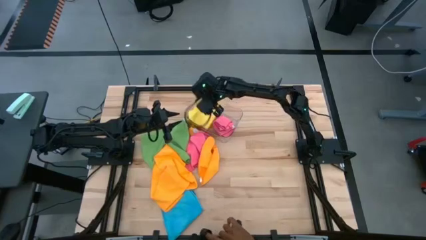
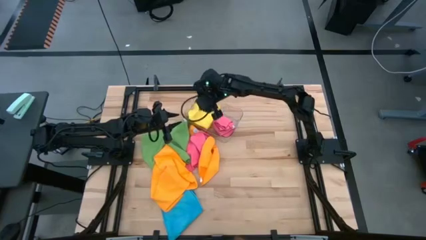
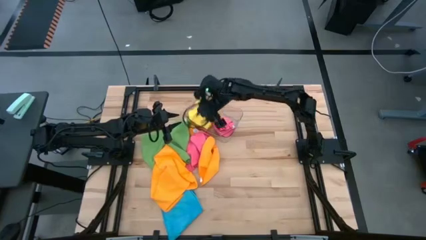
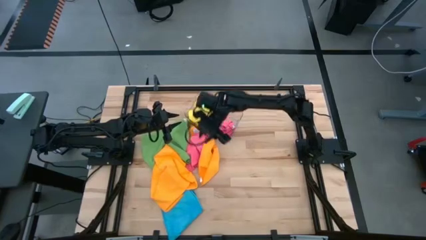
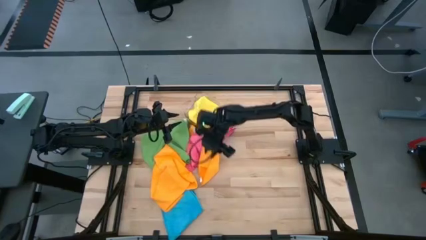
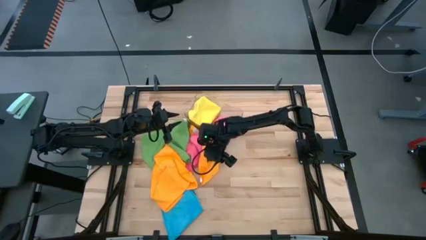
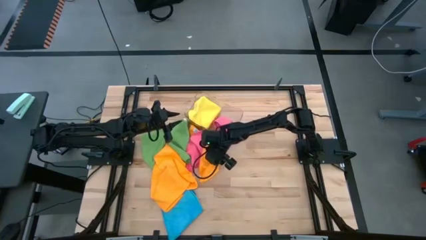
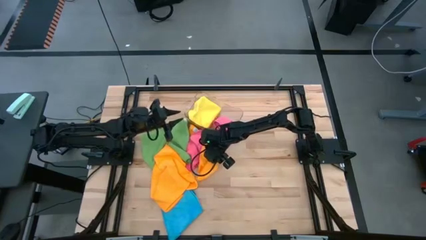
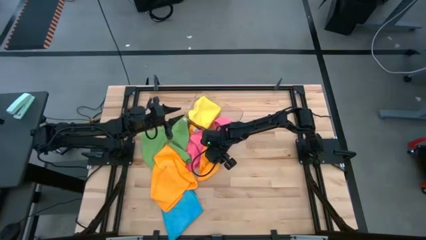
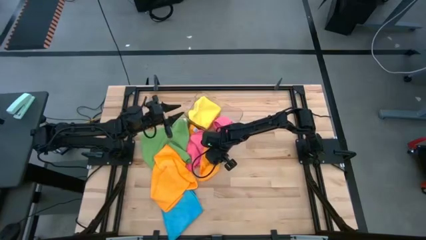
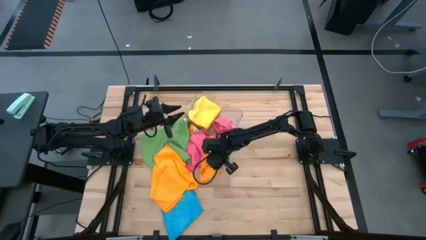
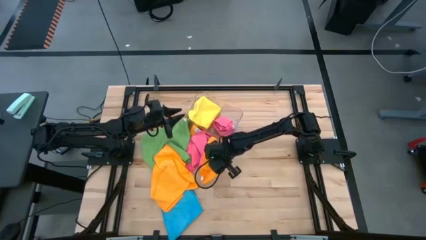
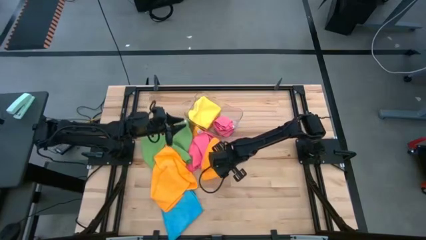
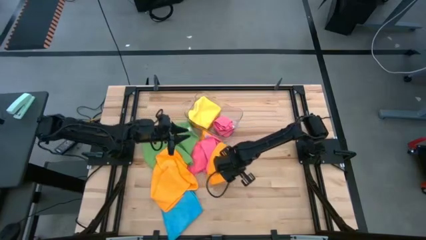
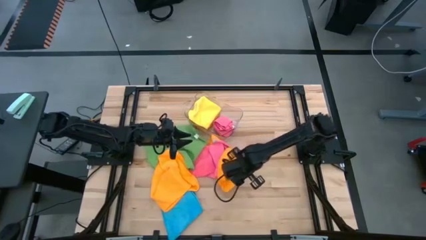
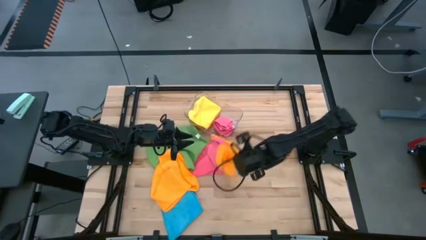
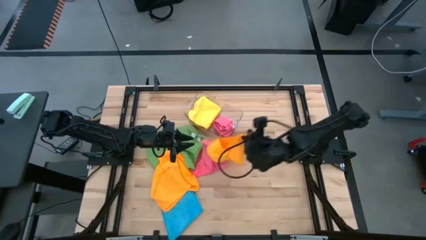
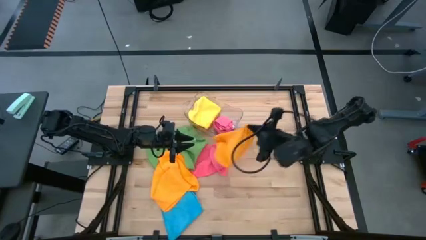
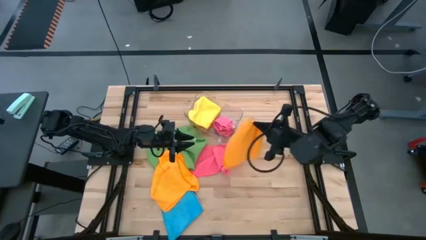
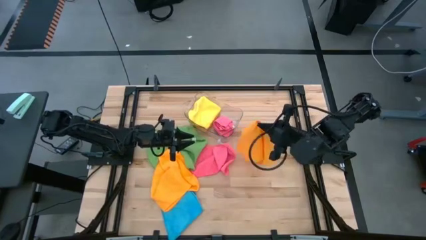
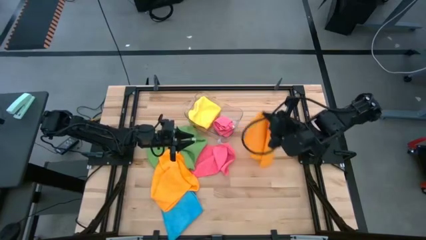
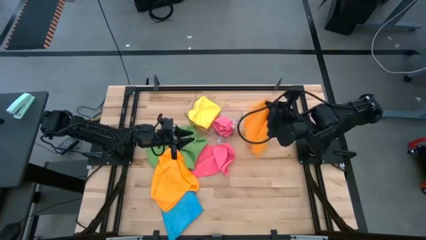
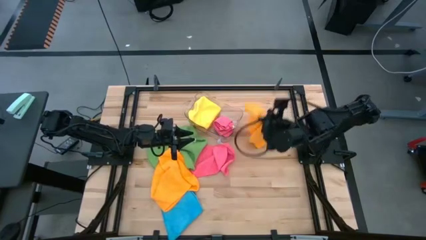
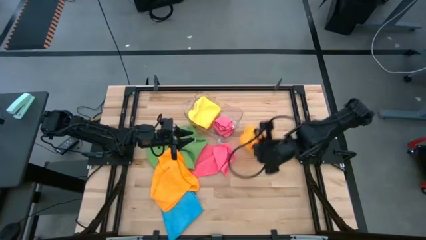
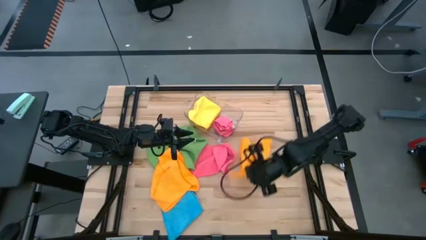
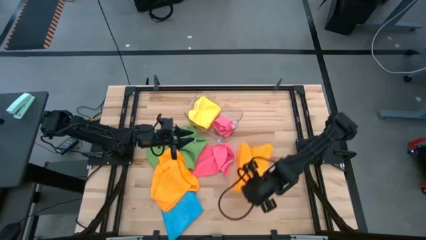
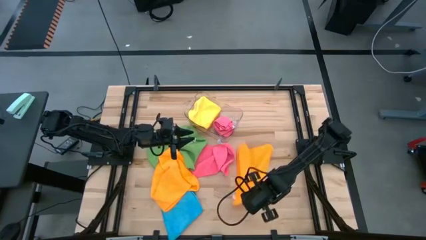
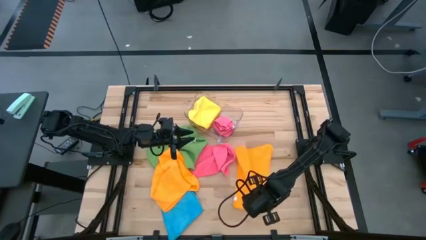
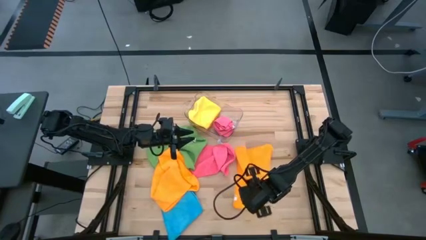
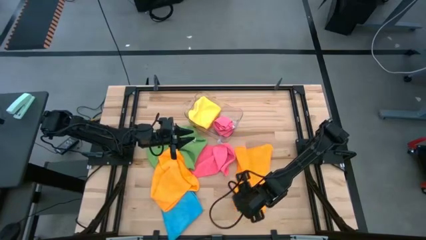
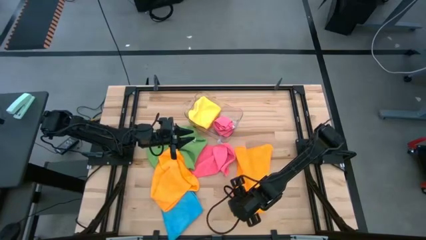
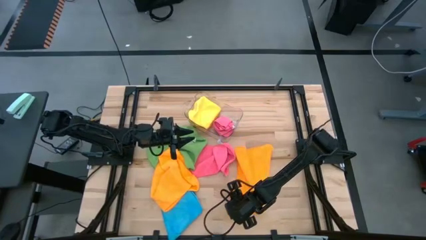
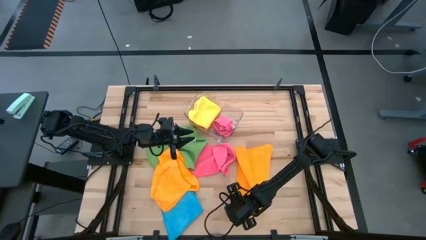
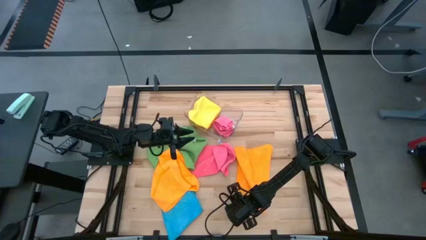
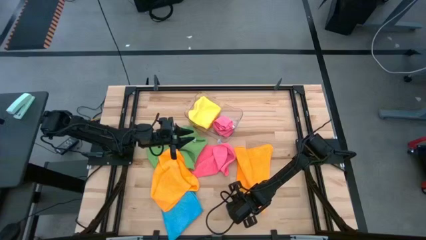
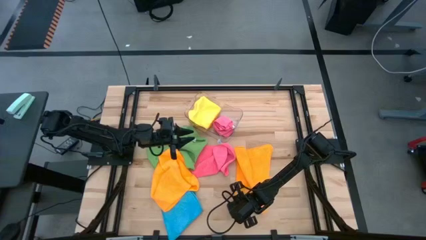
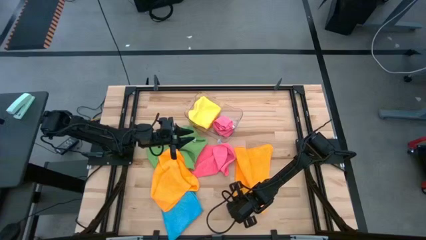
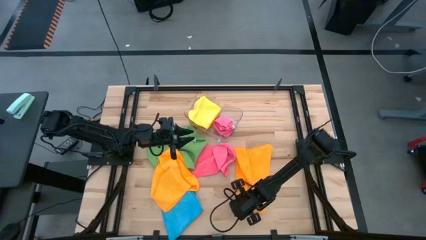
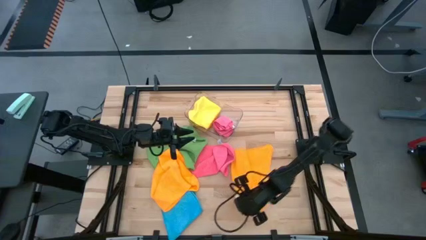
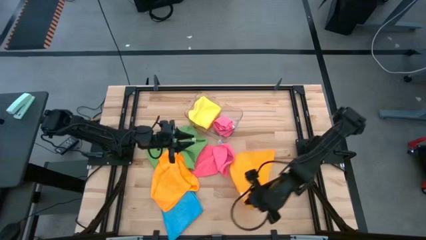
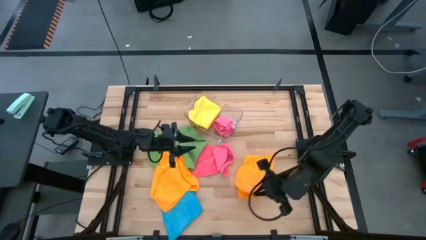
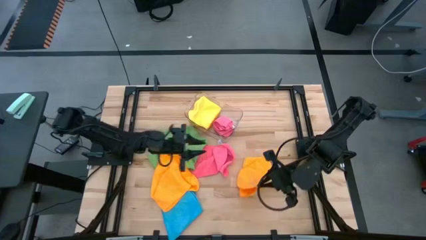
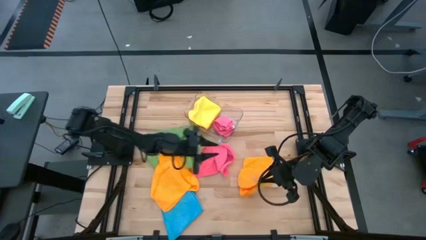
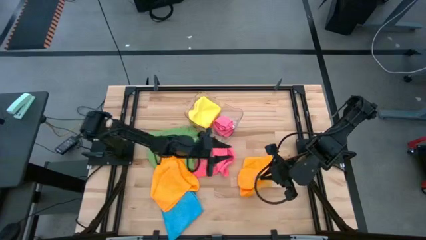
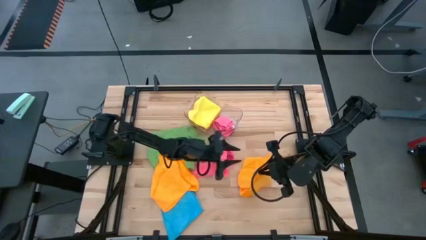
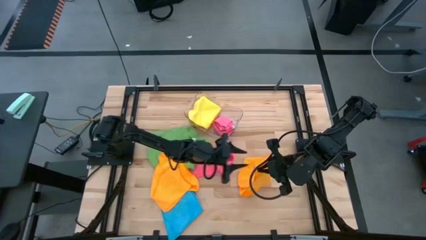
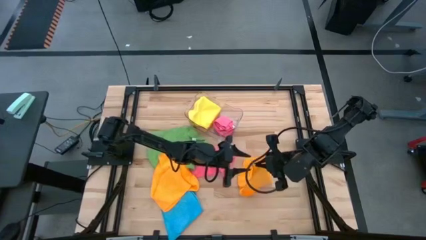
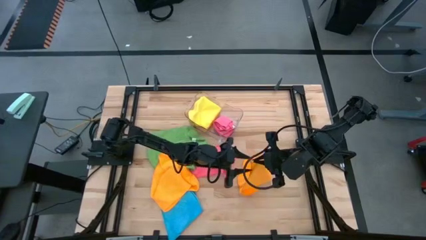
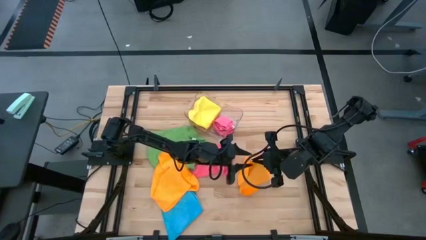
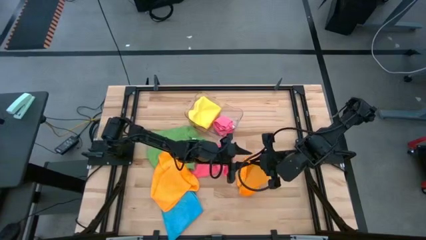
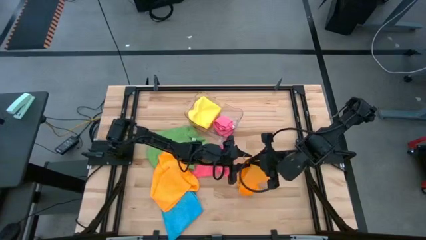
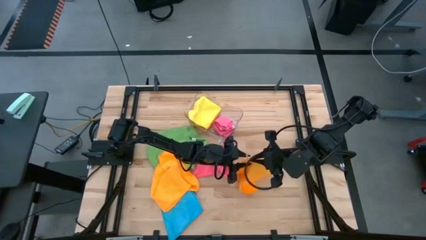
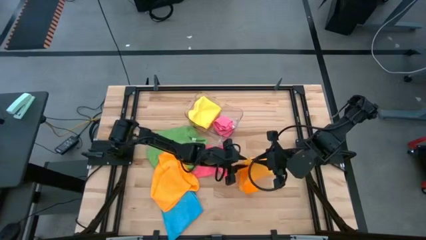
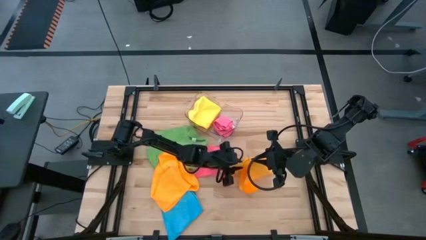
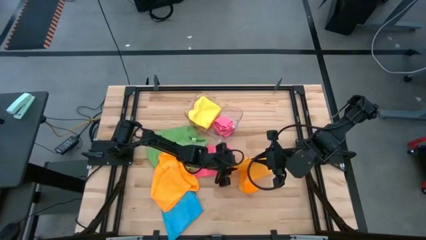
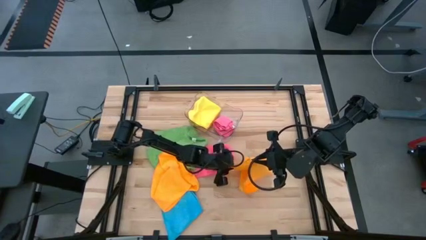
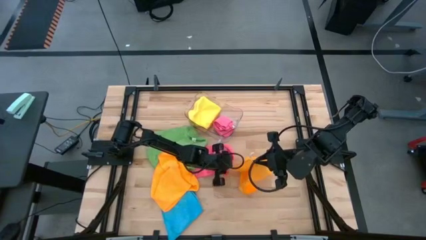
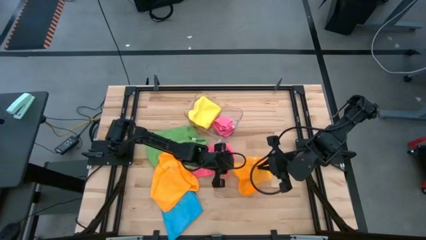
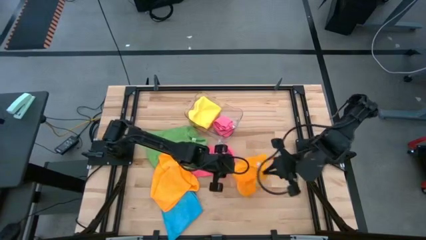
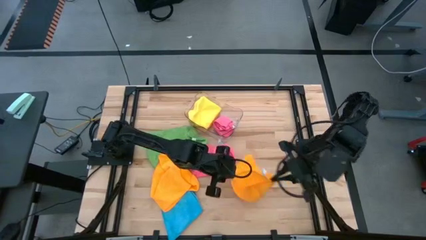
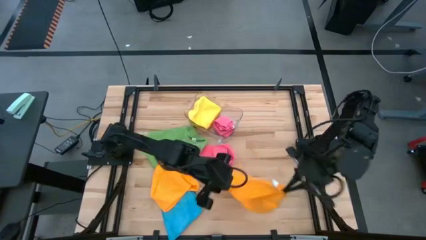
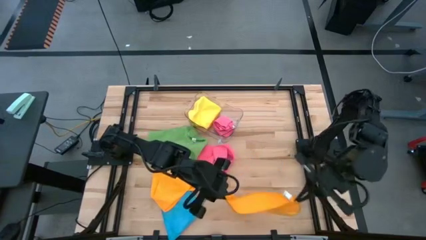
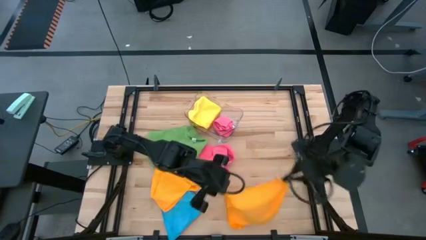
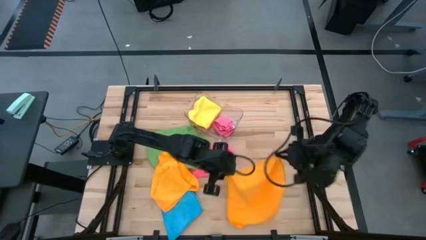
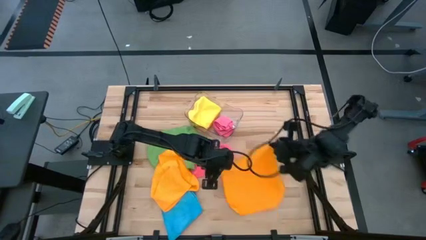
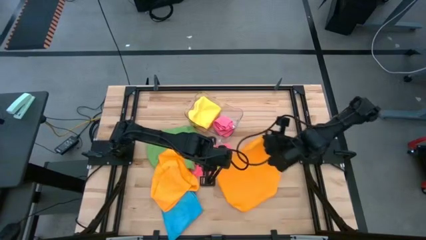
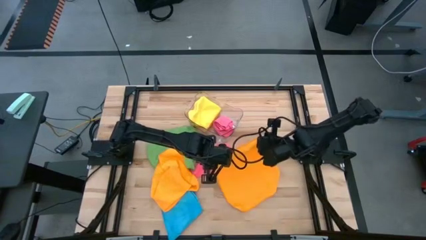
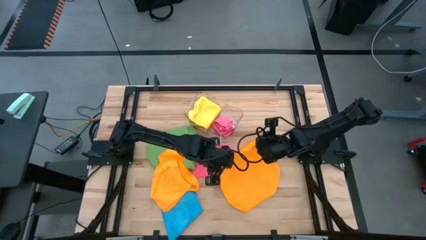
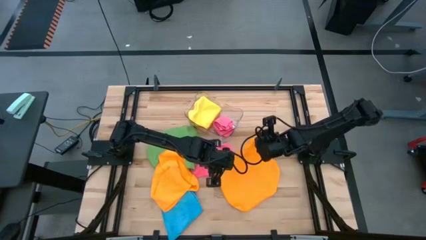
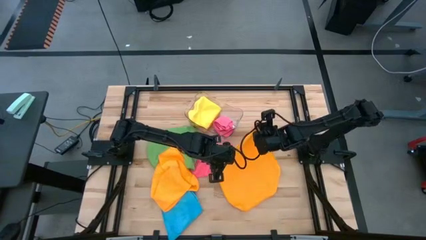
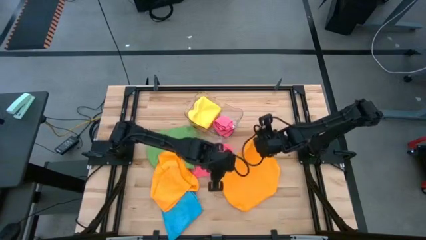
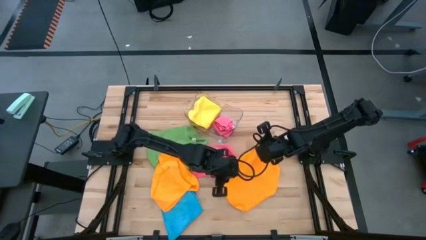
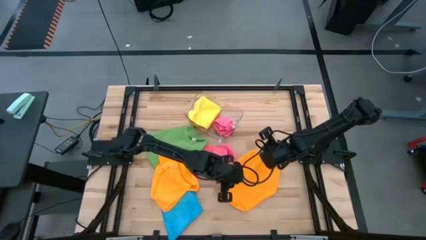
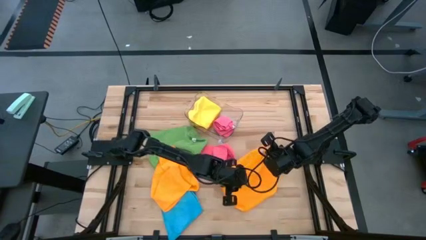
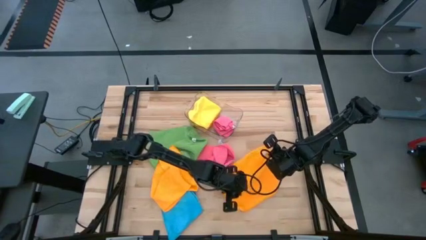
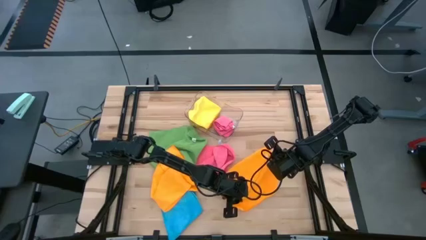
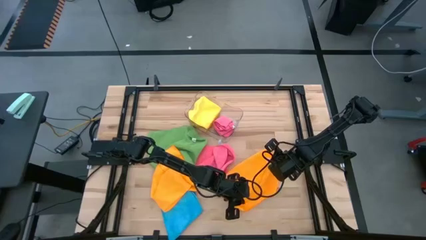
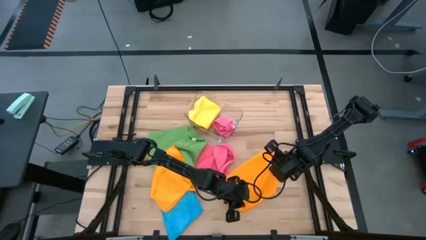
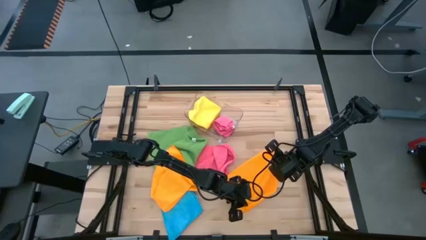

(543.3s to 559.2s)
Task: Fold microfiber towels
Fold the right orange microfiber cloth
